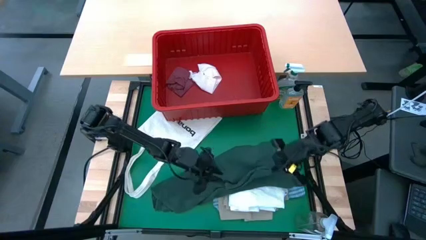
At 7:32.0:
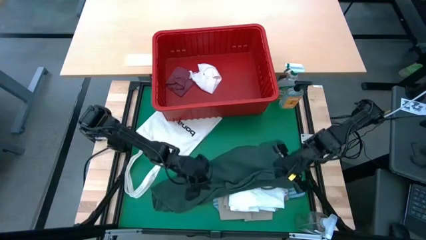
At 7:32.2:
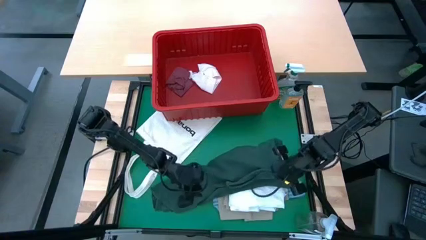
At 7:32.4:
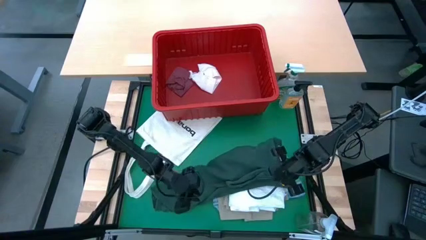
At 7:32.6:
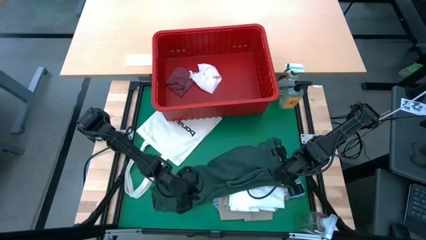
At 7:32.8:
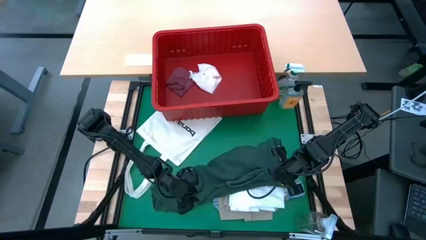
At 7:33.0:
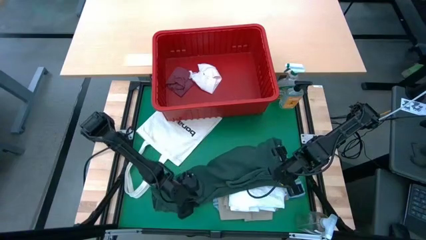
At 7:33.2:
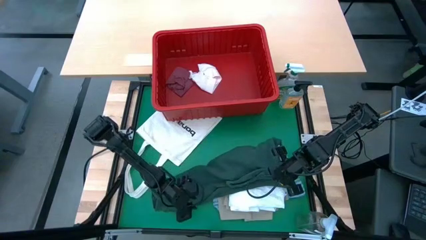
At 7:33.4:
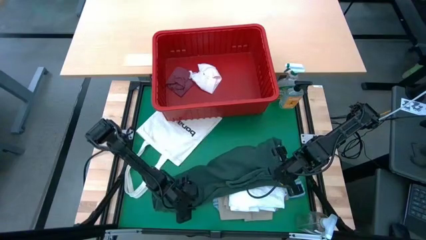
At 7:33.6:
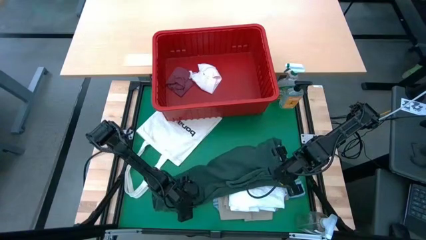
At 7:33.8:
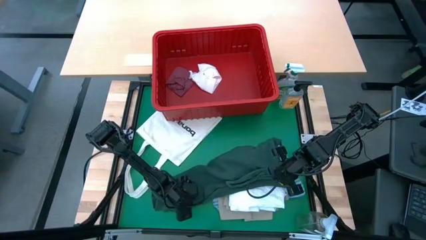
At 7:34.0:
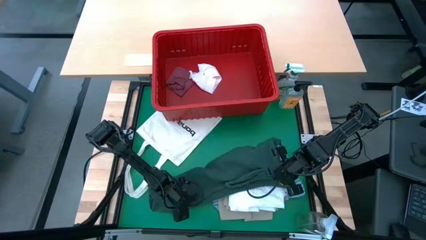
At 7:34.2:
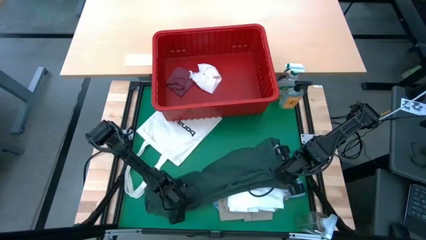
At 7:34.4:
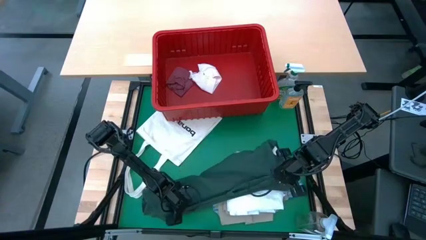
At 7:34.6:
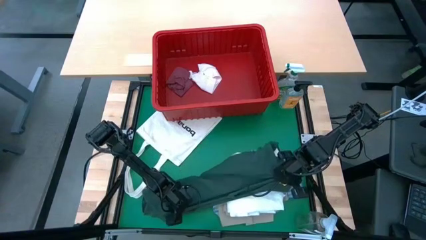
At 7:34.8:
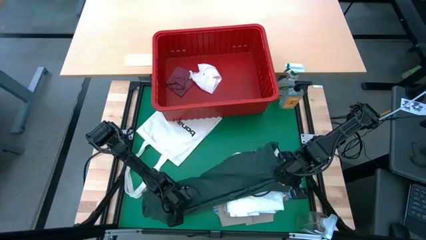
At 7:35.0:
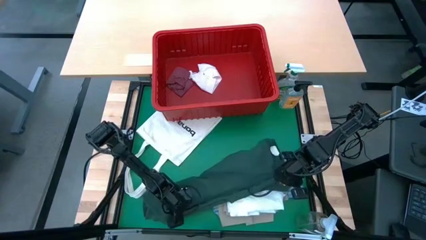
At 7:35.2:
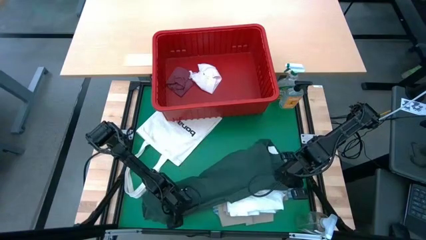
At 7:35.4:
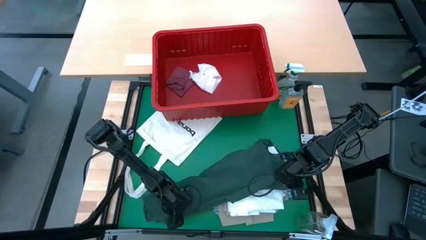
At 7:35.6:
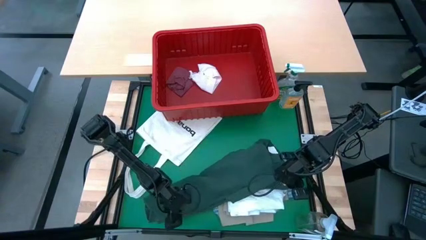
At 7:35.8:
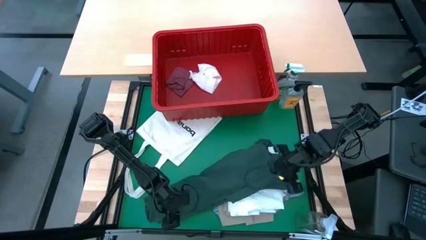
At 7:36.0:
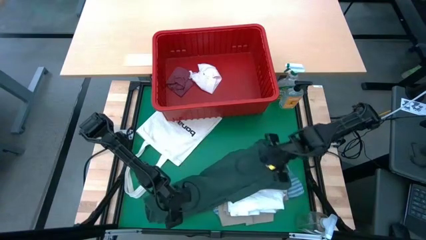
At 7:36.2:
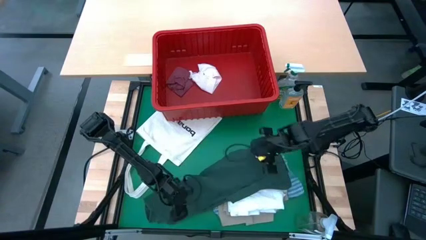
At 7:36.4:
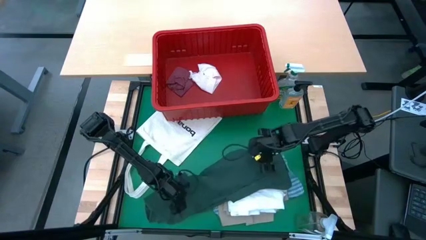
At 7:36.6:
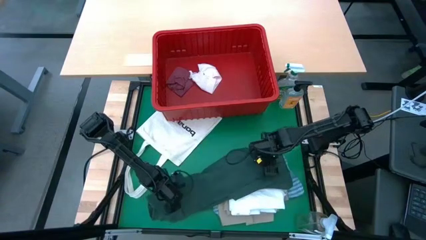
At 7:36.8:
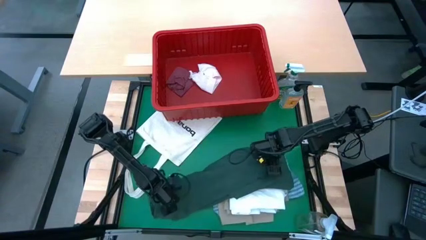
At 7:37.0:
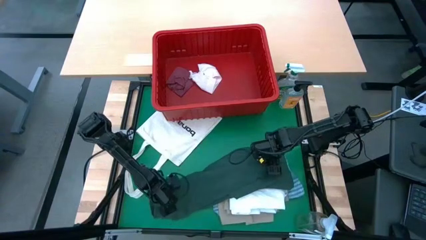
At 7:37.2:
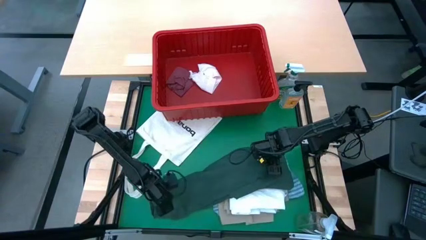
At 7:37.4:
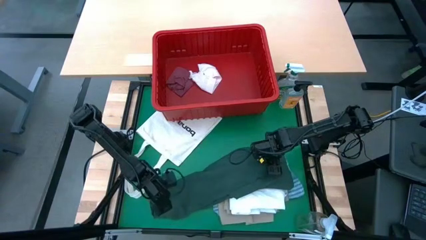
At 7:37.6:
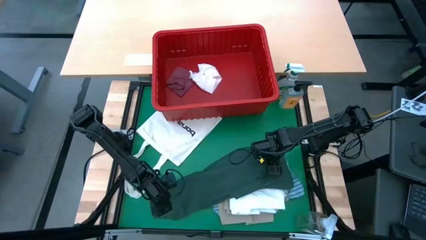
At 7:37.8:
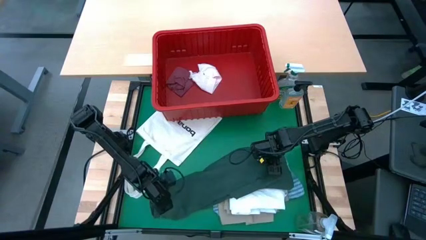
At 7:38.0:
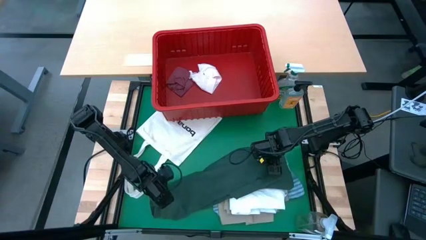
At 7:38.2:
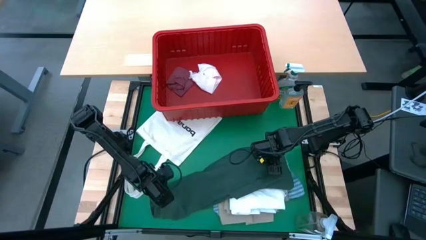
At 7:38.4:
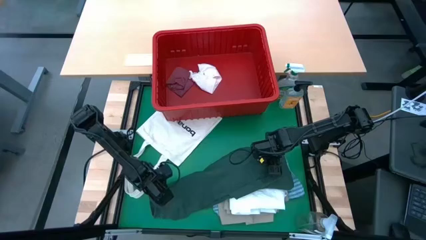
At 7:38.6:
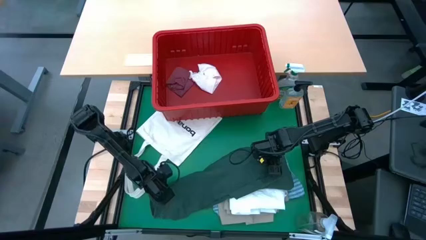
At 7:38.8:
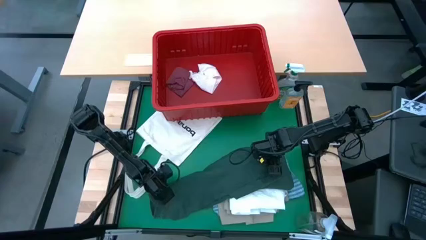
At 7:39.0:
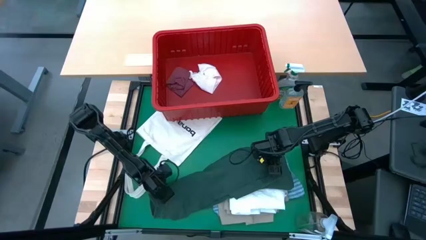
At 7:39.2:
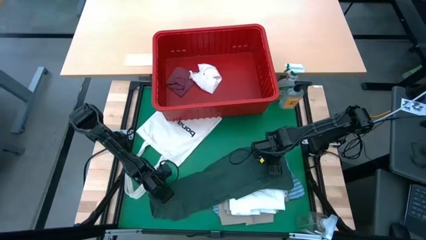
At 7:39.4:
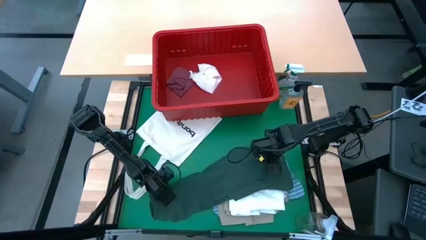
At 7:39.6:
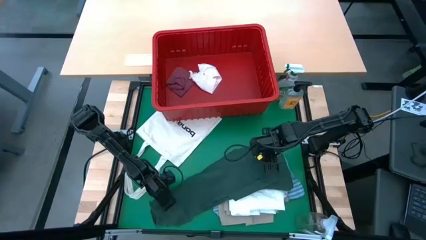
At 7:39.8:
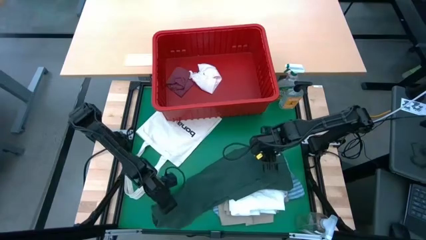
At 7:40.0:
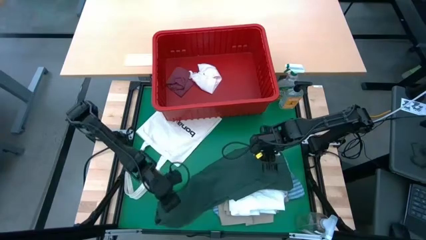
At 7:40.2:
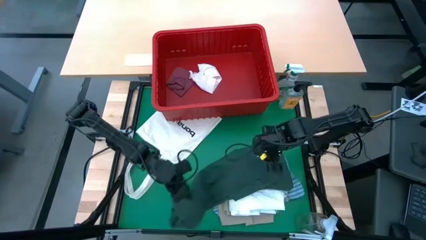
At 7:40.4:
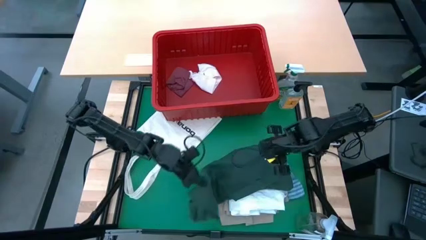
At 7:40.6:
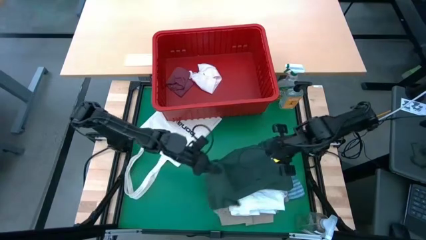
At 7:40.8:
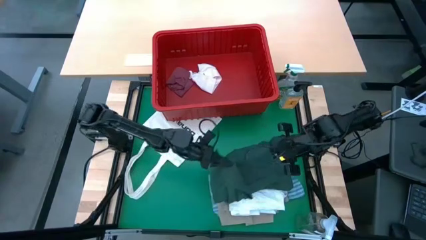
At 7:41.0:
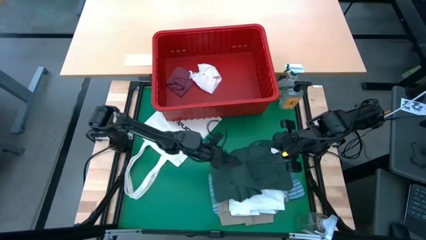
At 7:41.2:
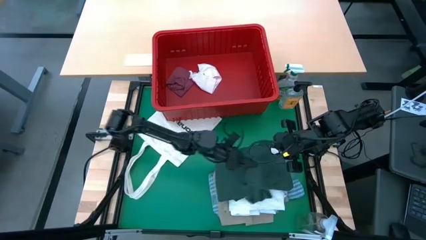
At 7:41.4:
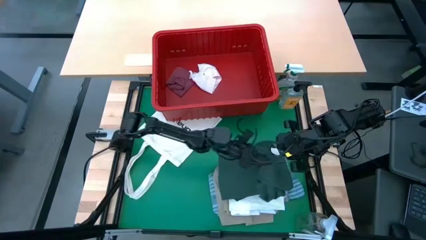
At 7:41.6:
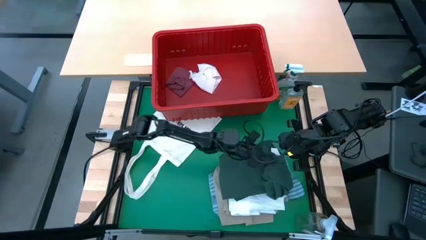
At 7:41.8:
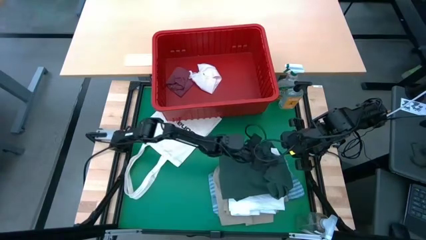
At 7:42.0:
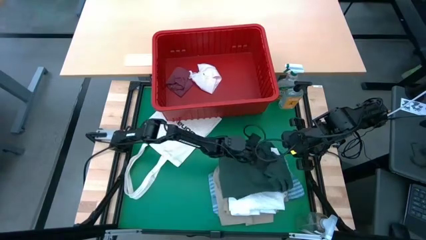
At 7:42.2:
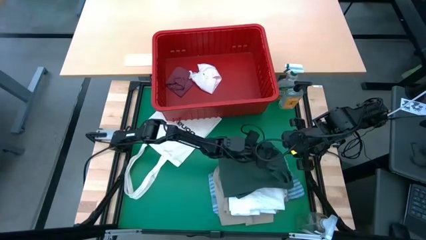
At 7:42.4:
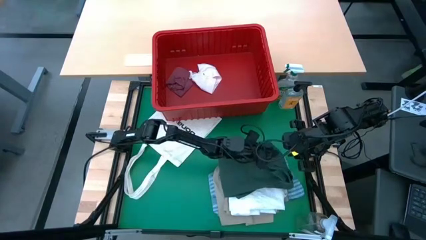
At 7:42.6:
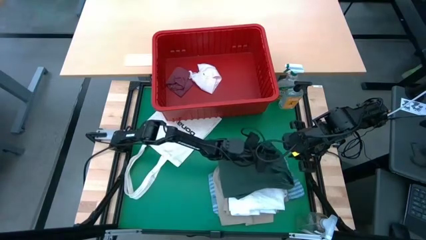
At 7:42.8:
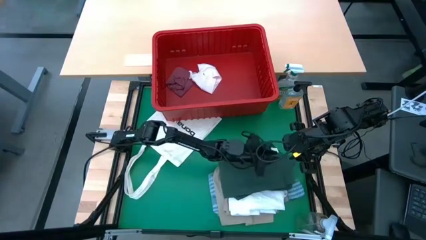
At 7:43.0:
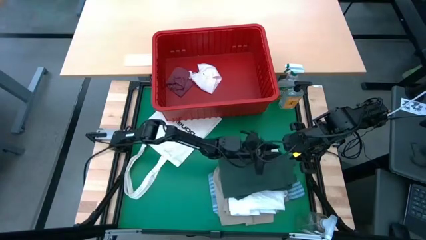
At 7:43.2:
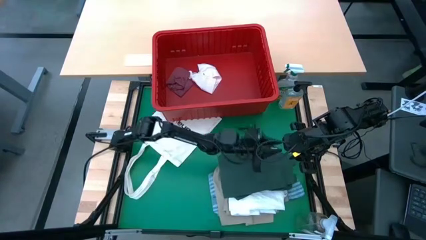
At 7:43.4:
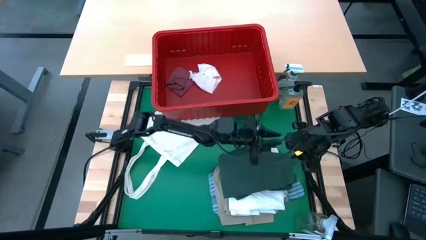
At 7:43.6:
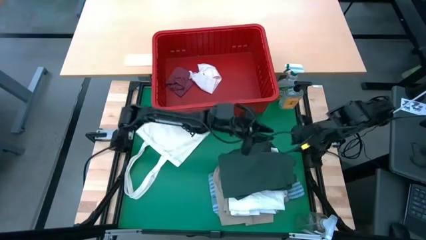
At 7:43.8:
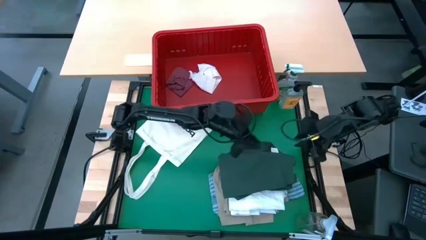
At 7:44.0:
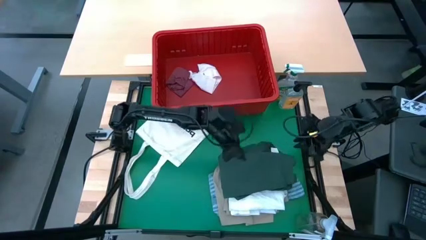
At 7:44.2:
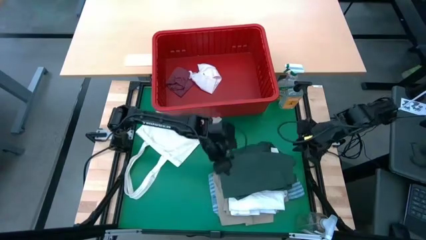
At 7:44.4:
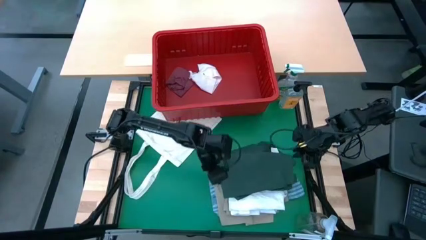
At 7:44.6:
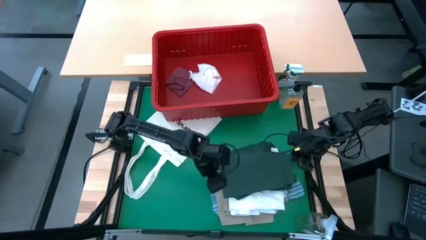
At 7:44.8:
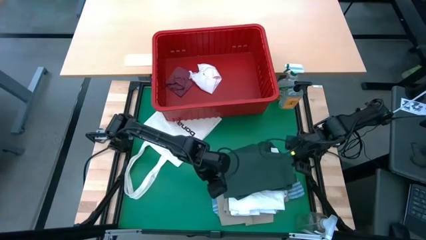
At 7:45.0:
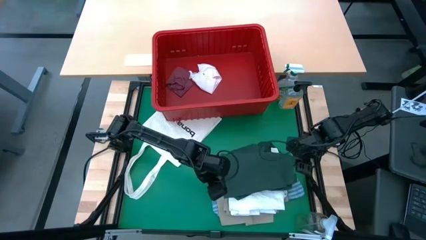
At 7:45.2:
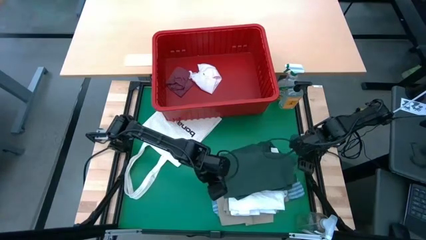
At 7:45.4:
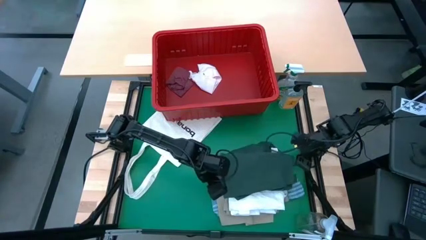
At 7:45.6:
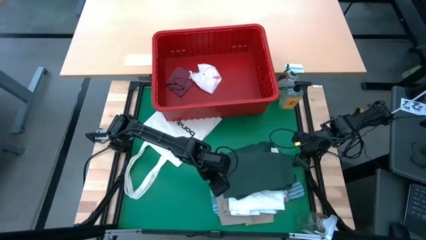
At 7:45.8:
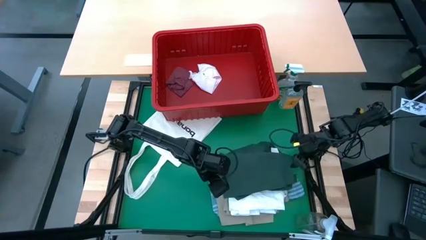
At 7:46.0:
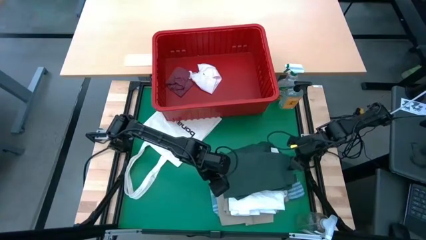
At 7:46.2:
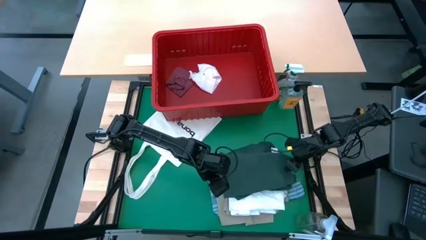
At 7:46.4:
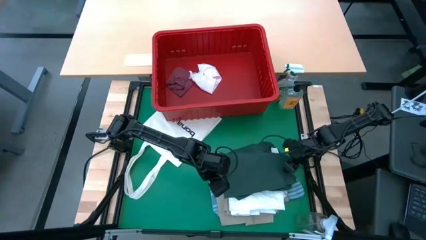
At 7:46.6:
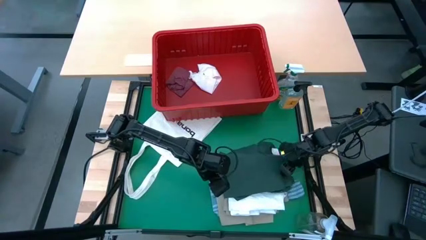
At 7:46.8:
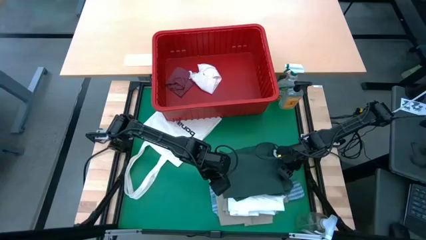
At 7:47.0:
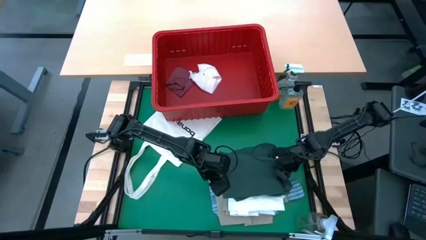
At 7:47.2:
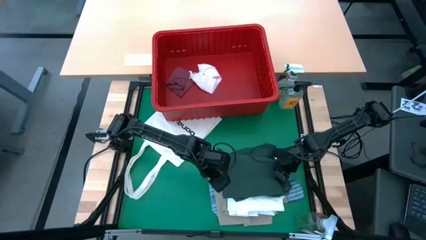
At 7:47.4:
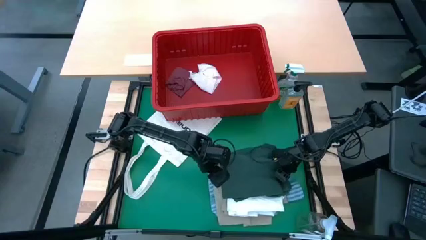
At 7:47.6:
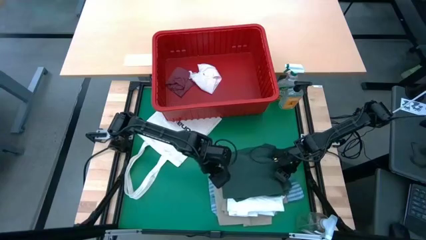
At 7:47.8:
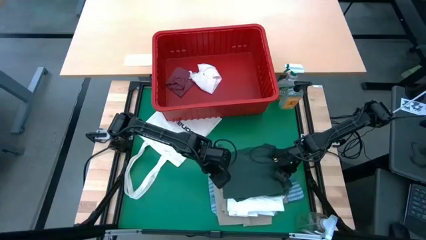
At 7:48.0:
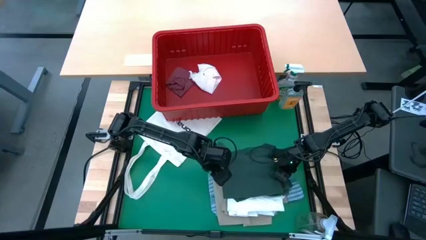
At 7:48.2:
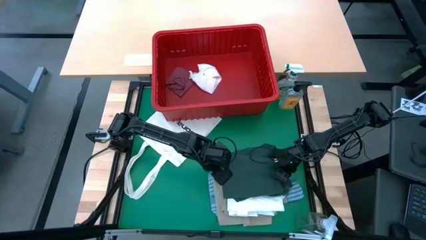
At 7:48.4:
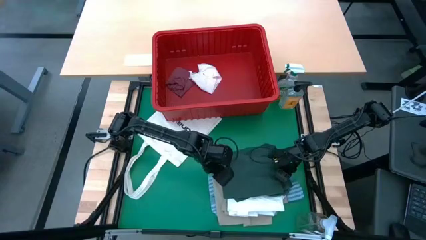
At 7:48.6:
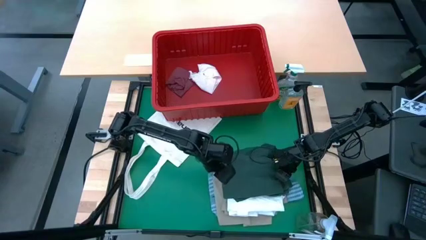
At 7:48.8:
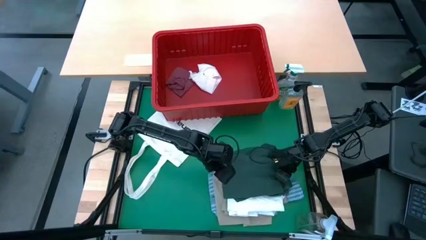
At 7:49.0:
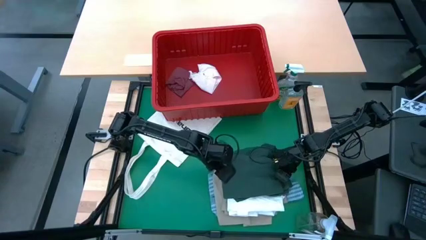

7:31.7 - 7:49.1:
Task: Fold Laundry from Bin
Fold the green shirt
